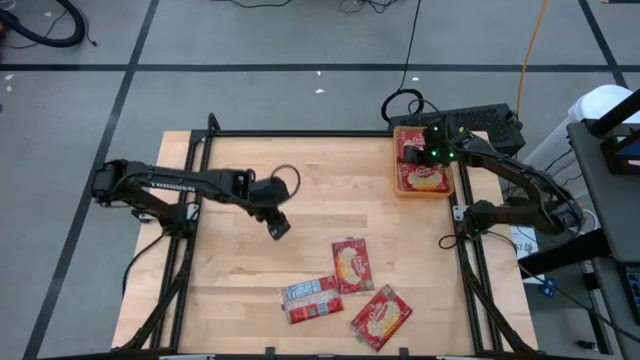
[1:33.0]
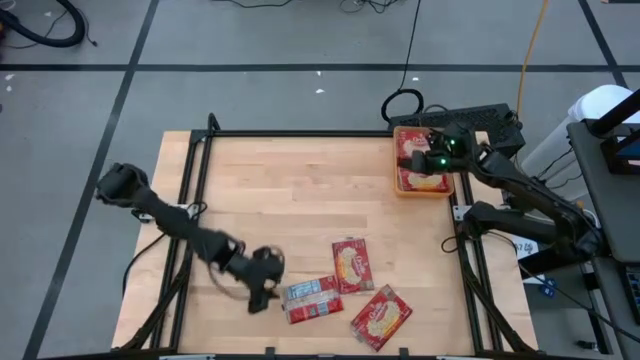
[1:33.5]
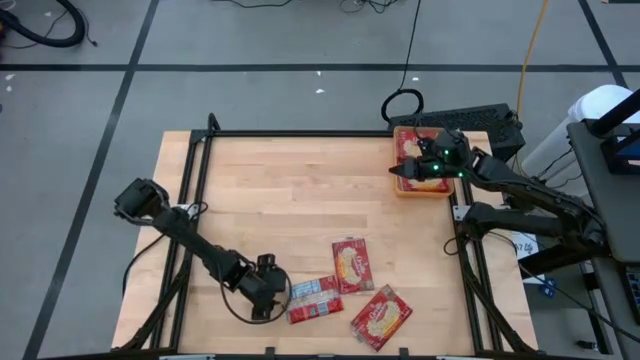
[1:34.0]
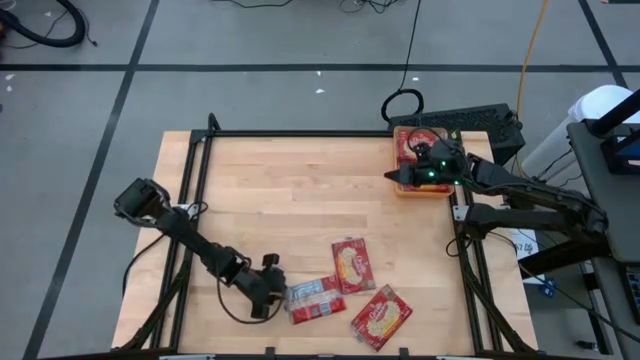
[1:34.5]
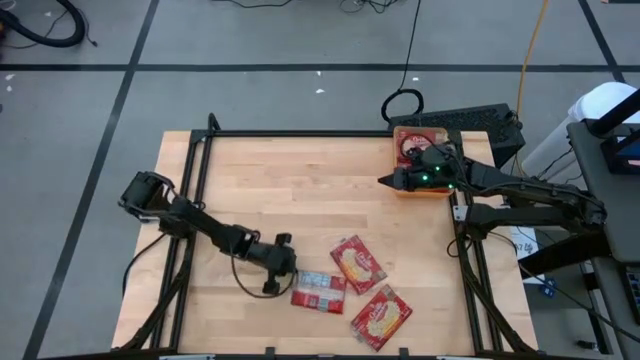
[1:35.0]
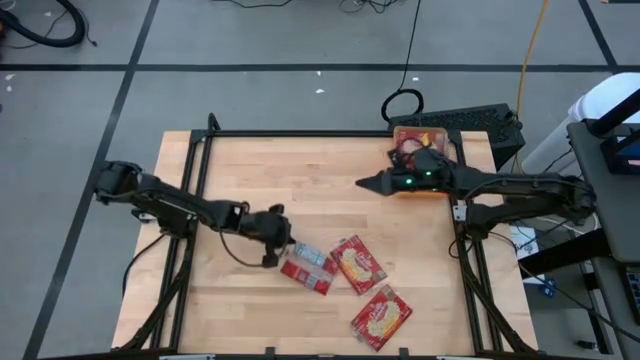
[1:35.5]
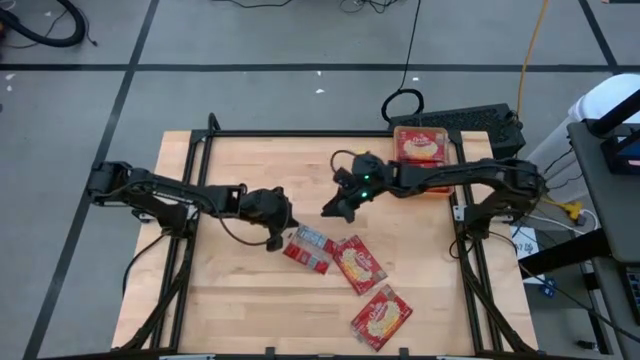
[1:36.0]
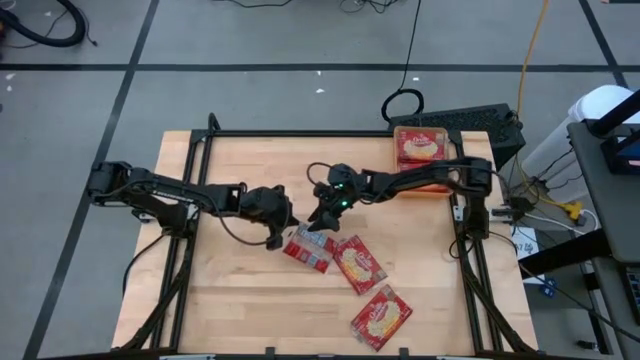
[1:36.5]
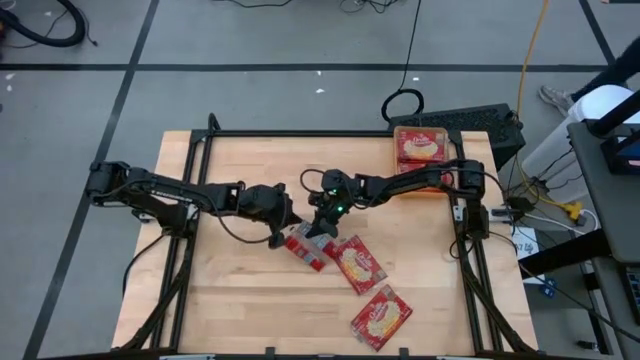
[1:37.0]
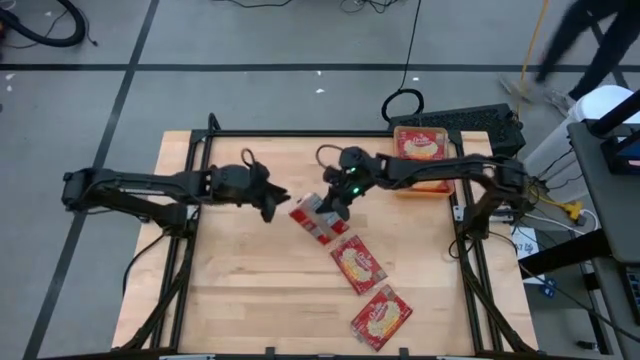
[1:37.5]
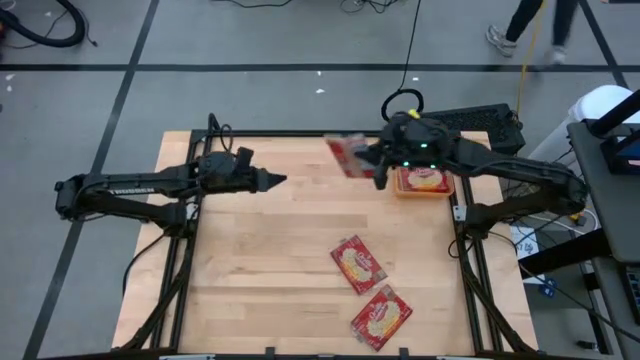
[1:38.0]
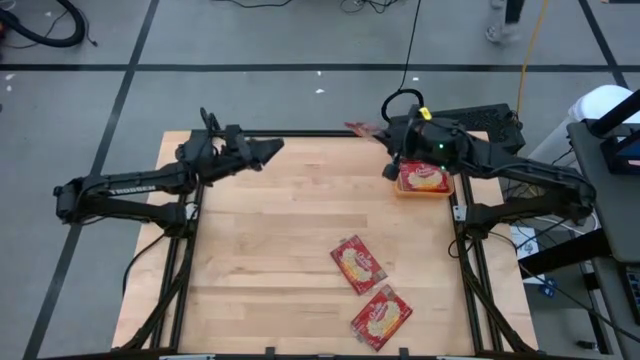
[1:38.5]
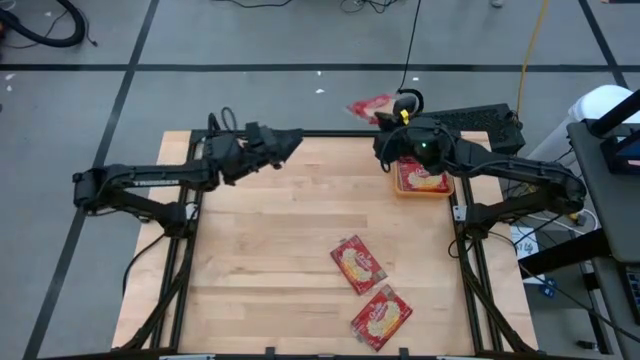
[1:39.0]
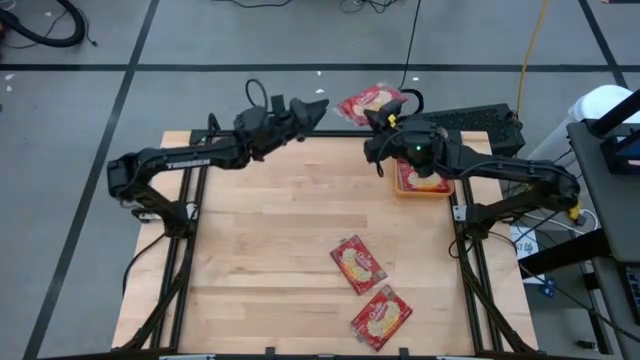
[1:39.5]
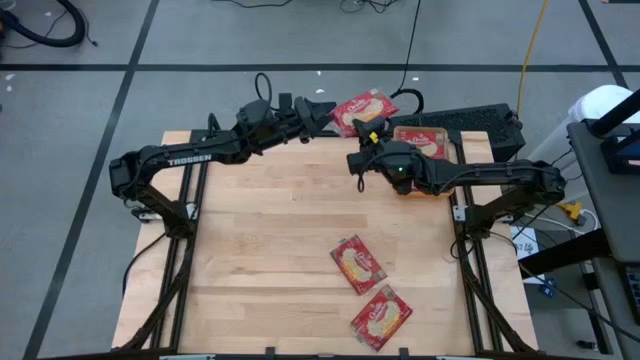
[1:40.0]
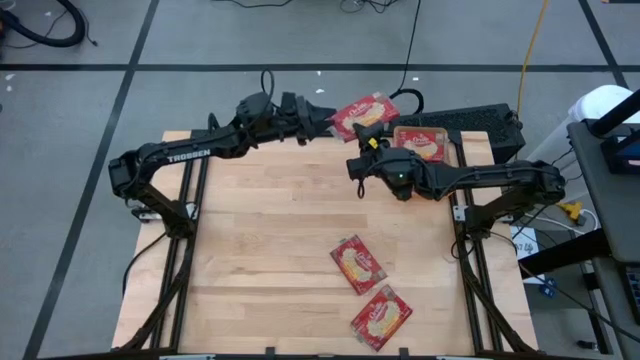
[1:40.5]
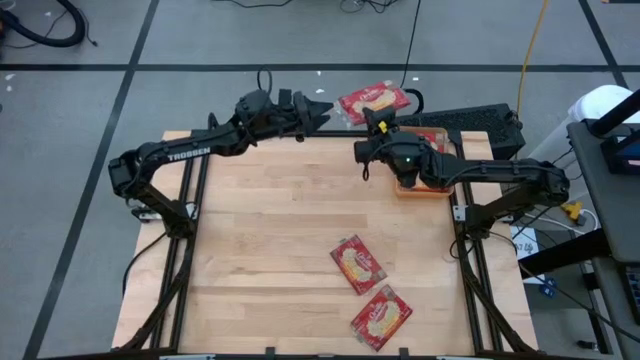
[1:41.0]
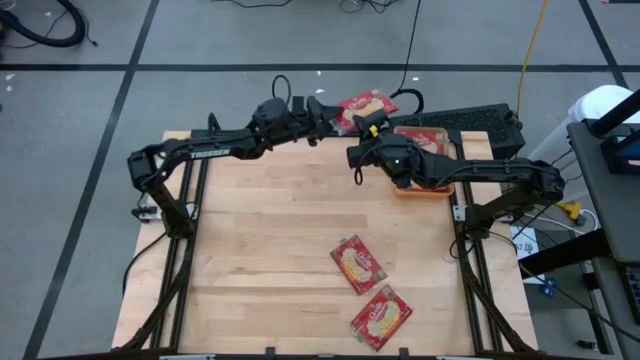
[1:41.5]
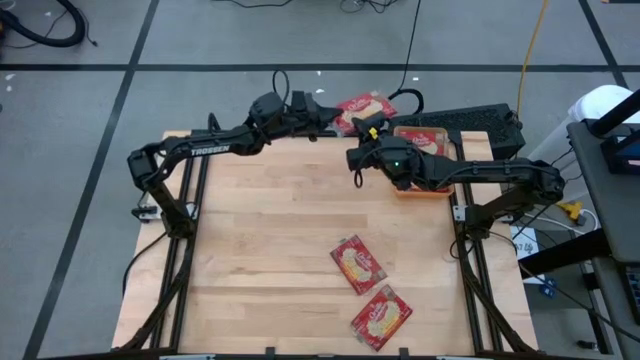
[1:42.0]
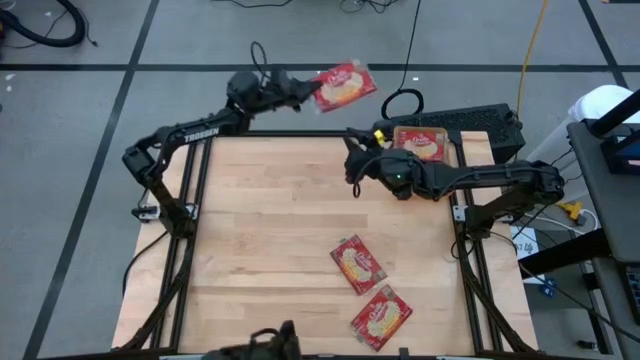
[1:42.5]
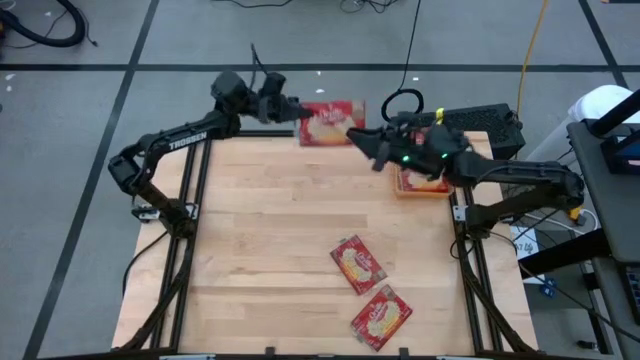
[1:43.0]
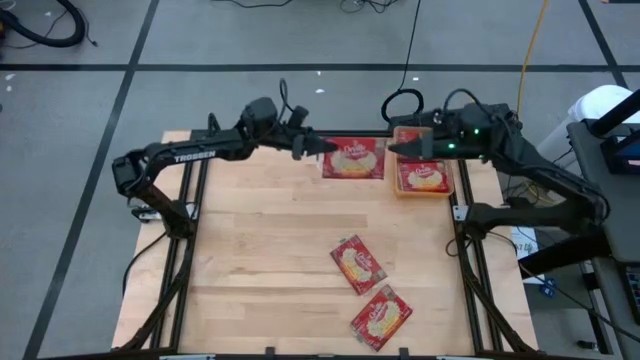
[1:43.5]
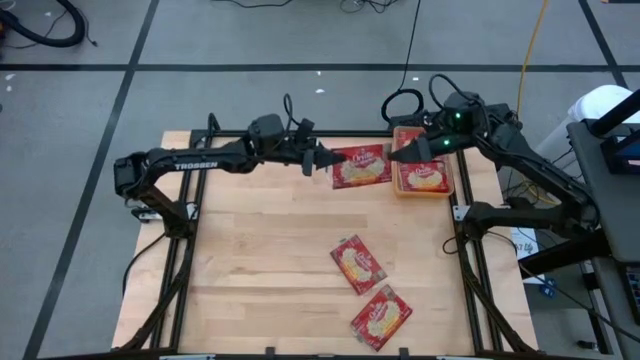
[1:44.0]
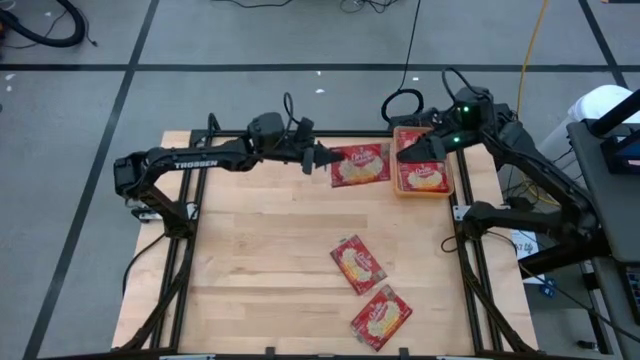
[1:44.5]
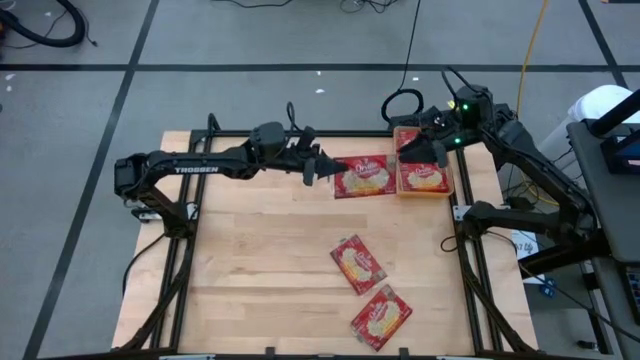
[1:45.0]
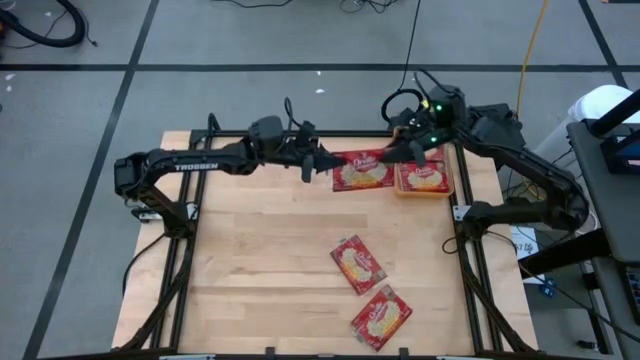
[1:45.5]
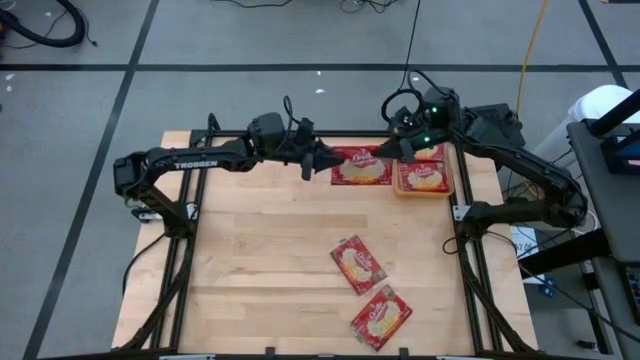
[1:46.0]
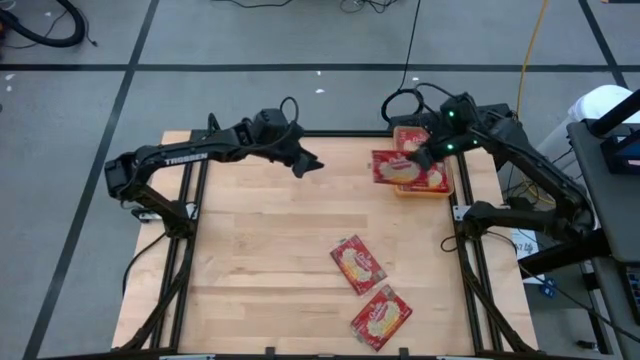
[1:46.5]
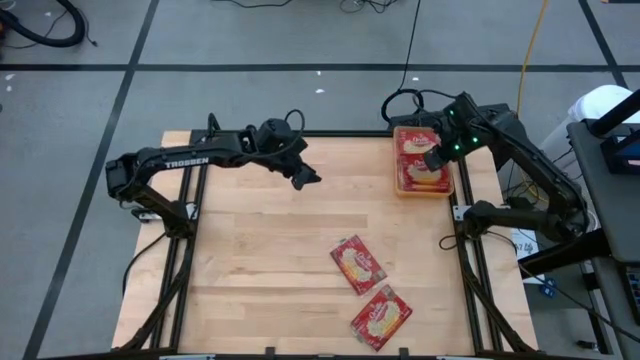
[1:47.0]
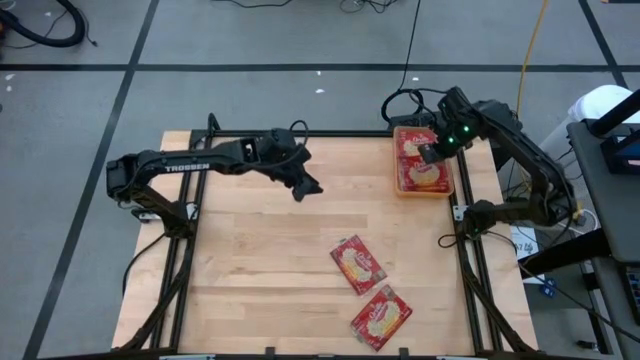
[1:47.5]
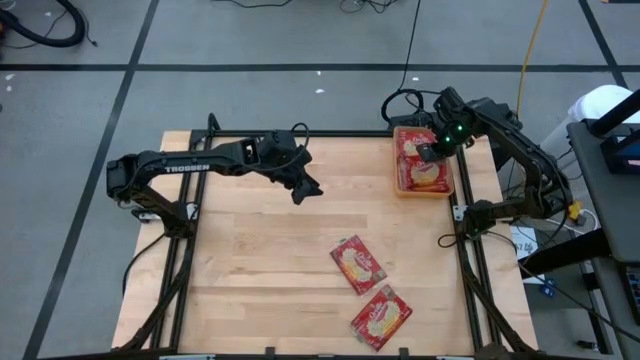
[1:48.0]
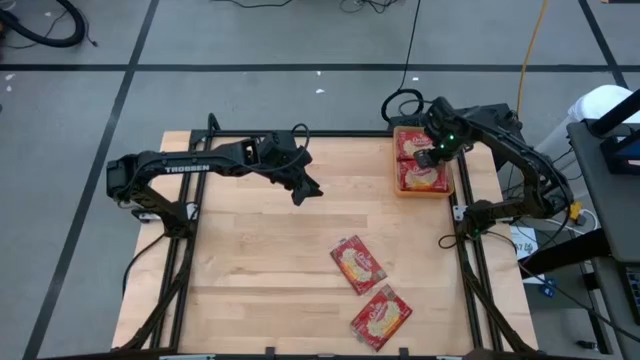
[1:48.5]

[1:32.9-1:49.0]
Task: Sort popcorn bags into baskets
Put the red popcorn bag into the orange bin
